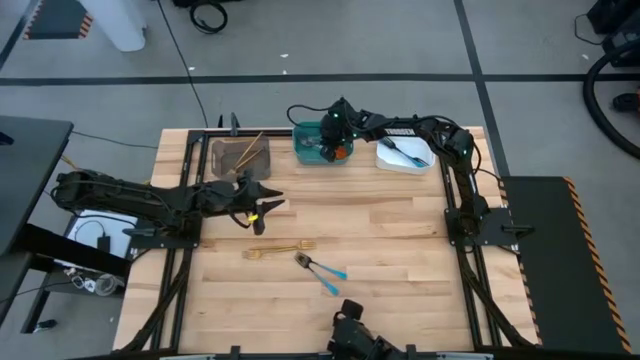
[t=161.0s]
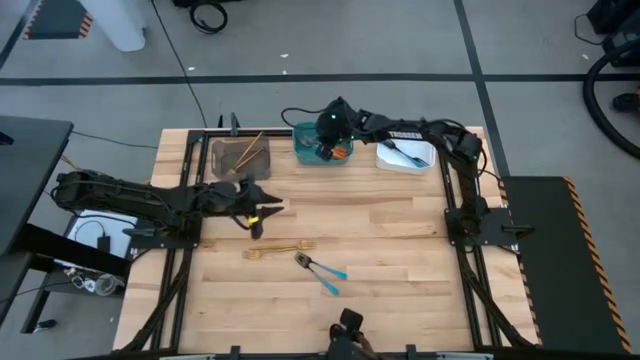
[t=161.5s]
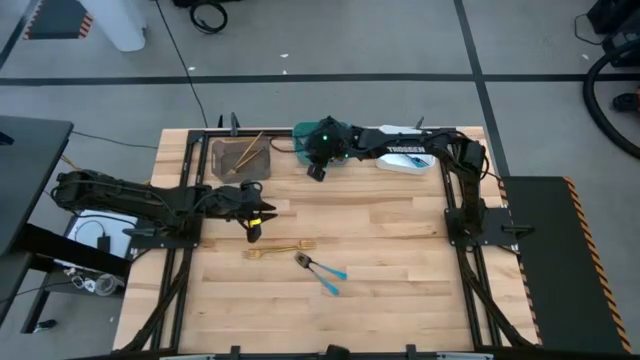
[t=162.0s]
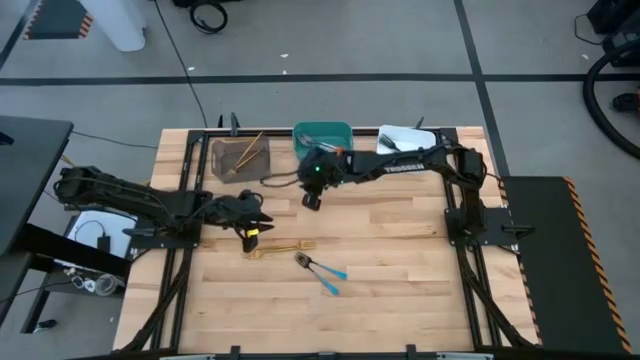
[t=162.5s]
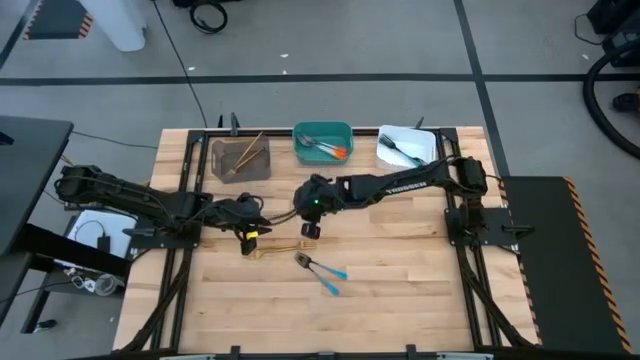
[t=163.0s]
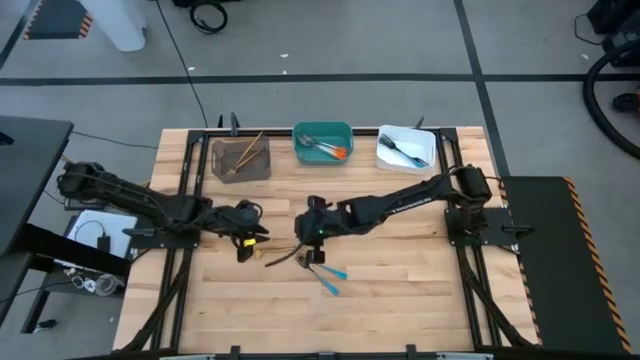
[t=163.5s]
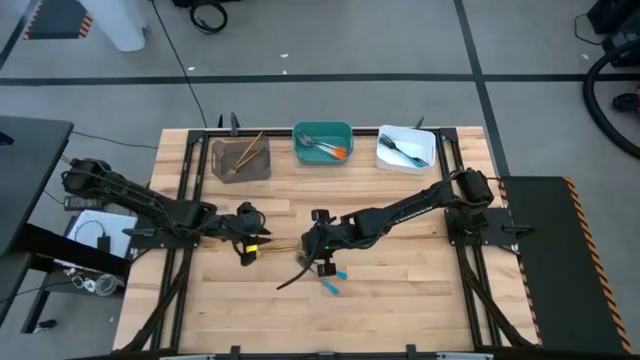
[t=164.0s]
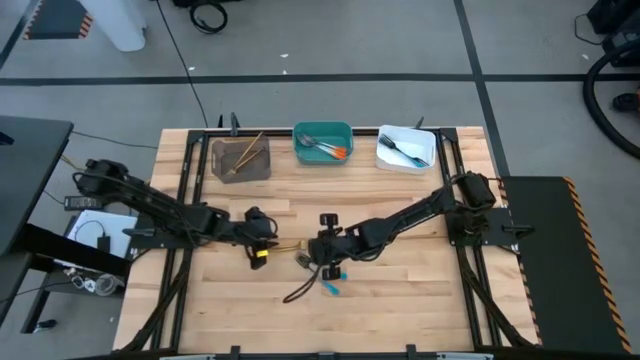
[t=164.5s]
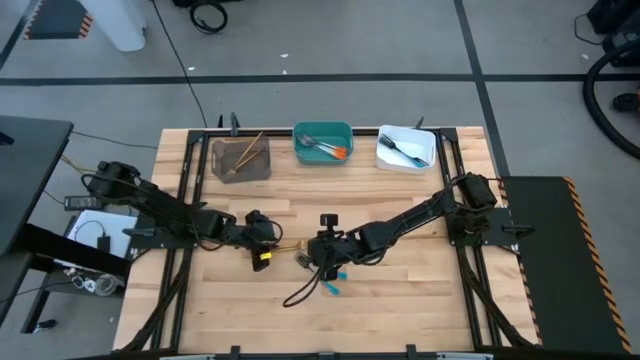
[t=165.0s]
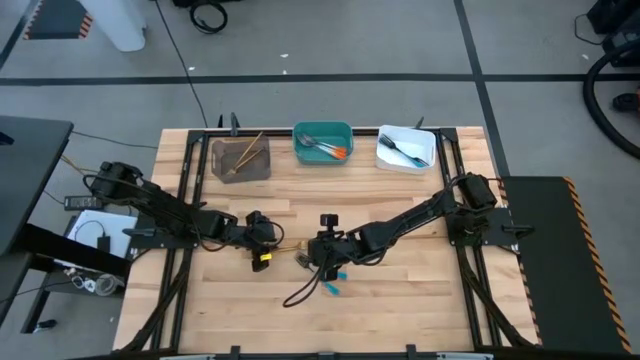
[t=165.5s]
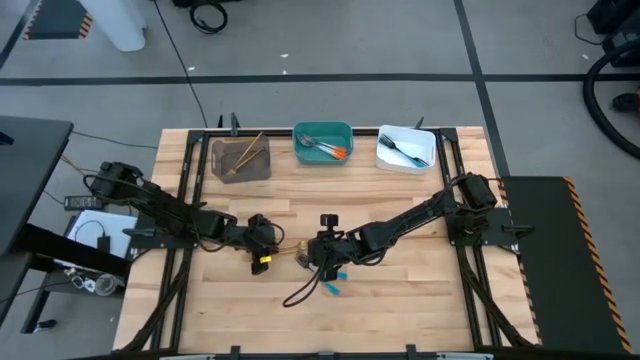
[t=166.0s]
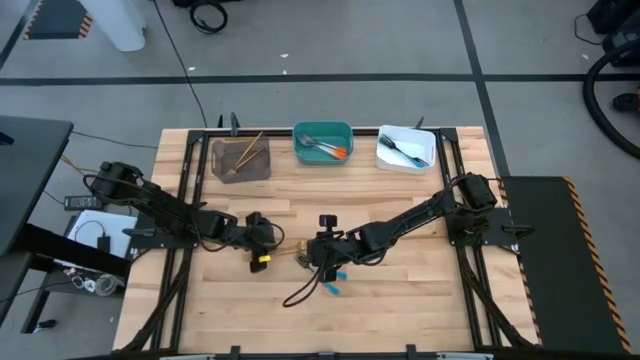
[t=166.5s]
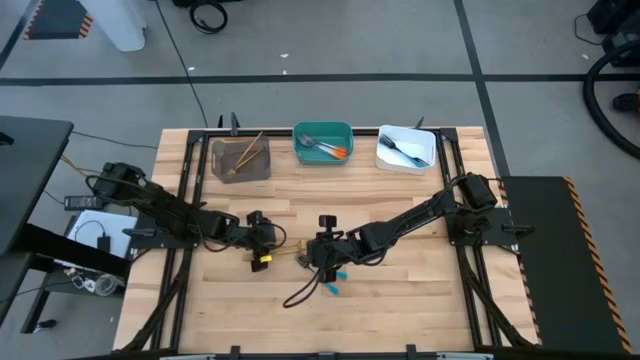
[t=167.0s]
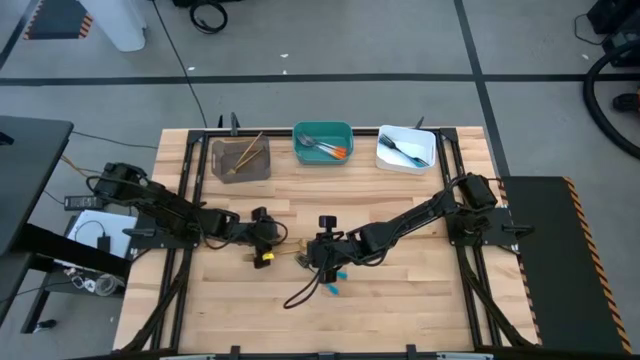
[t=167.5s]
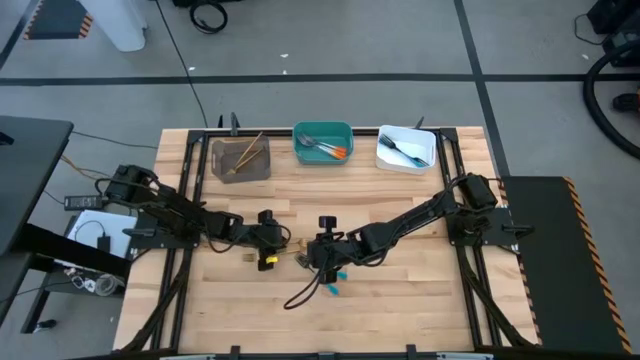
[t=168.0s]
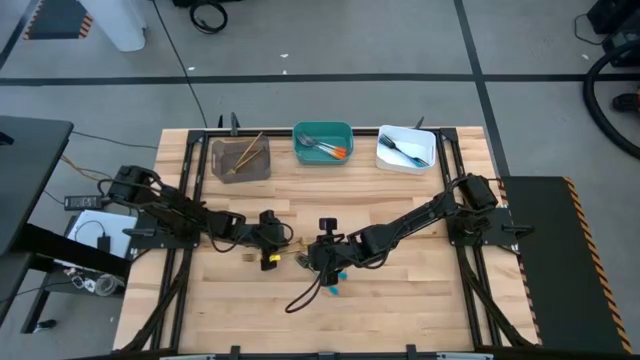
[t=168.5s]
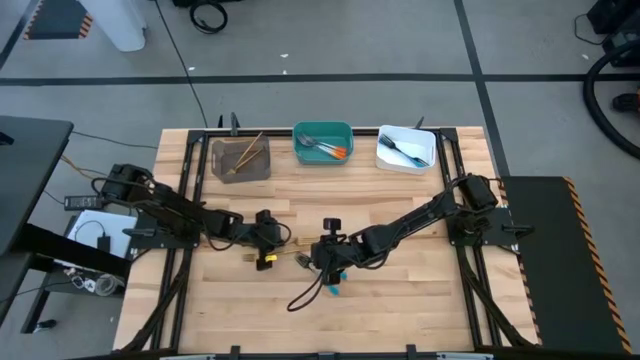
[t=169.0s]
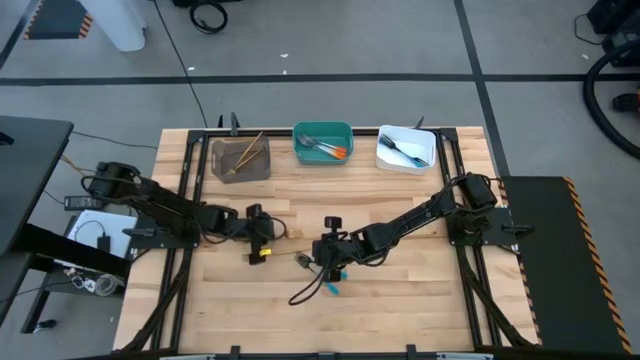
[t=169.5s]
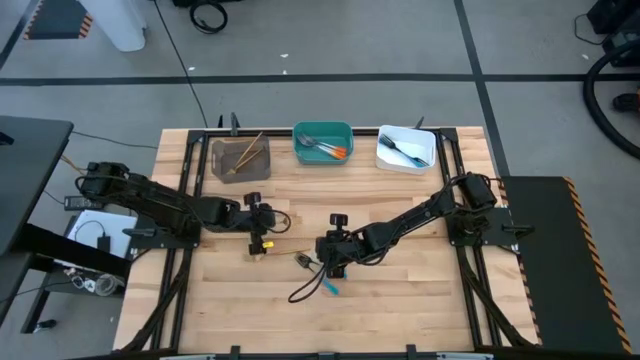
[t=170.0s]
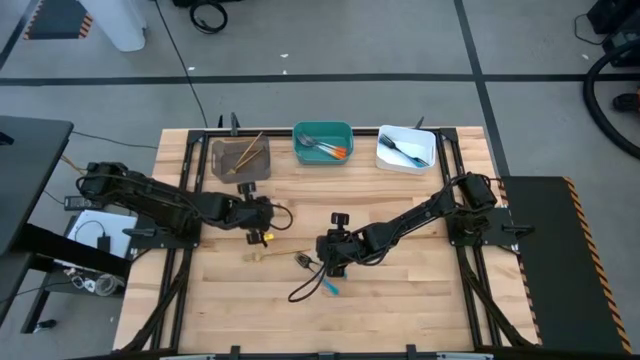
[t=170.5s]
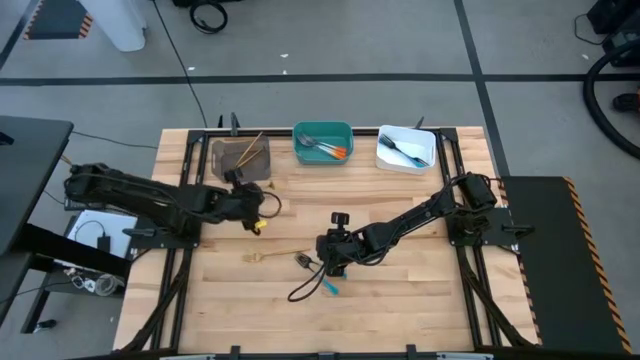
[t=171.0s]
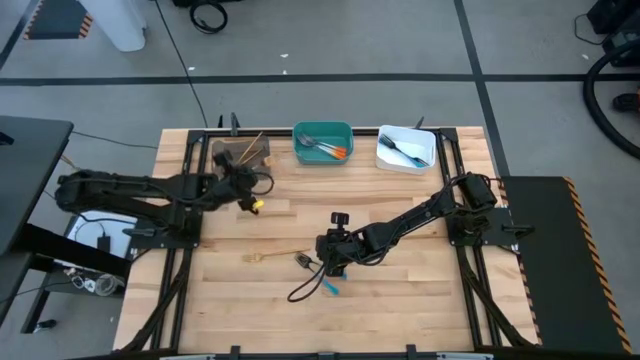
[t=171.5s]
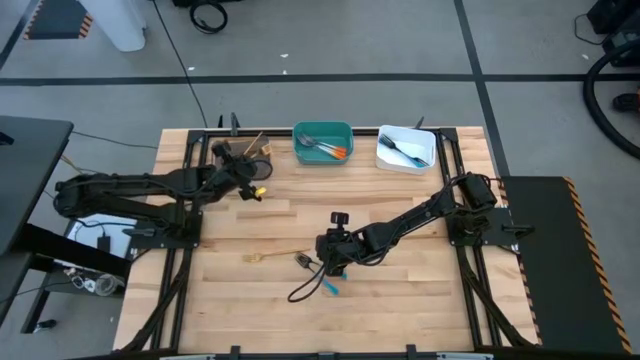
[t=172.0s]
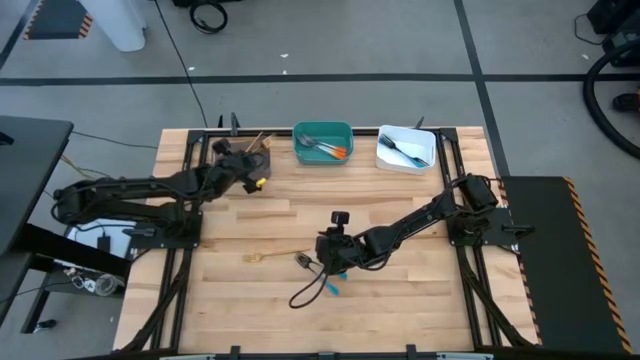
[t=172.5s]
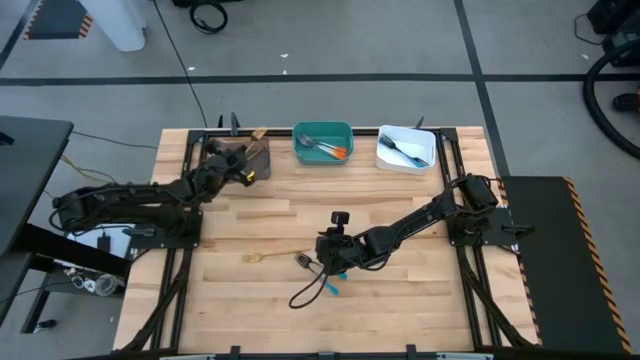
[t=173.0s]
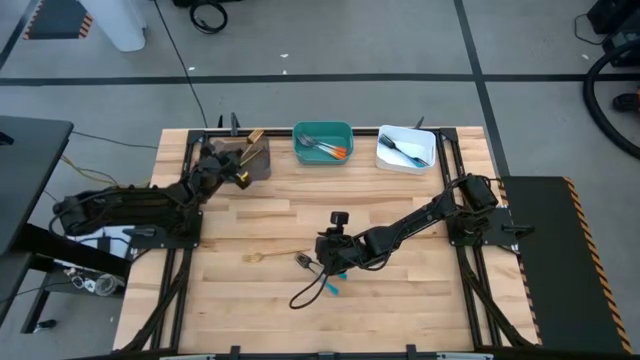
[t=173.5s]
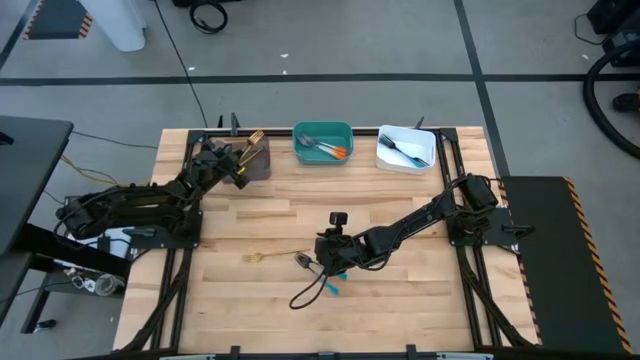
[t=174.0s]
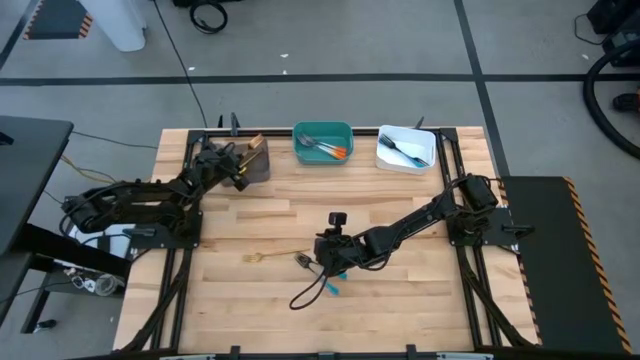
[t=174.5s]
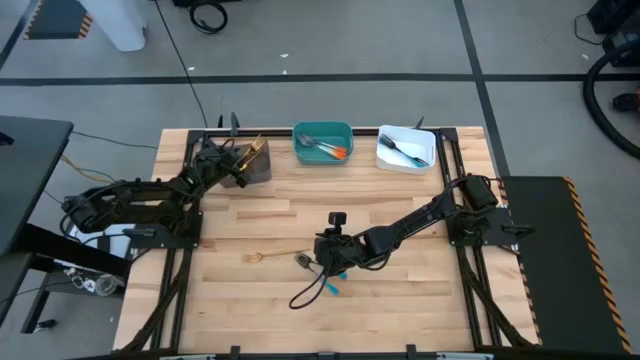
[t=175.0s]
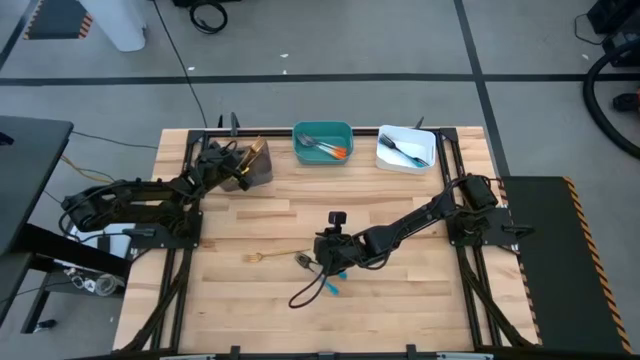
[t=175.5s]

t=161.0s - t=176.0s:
Task: Sort silverware by color (type)
Put the gold fork into the black bin

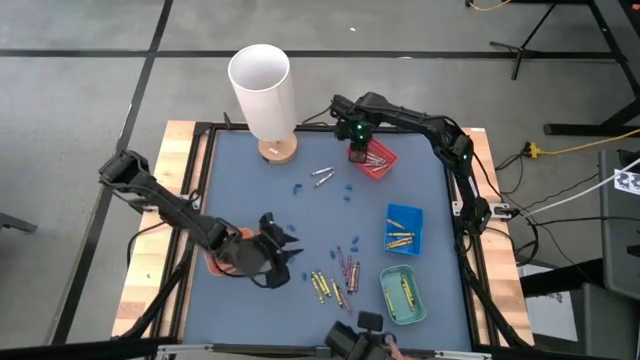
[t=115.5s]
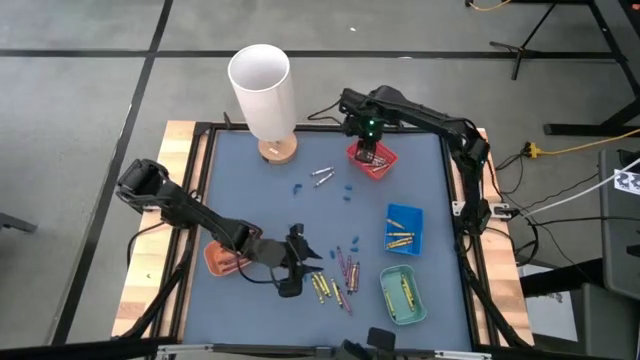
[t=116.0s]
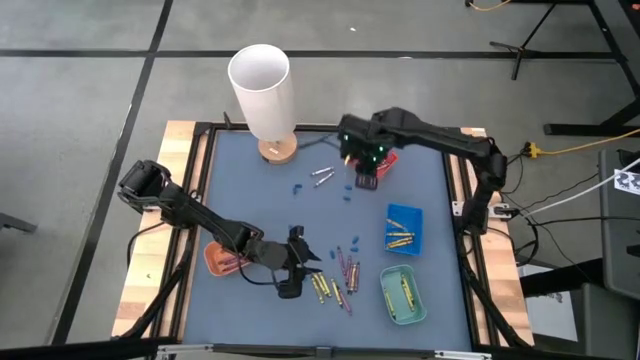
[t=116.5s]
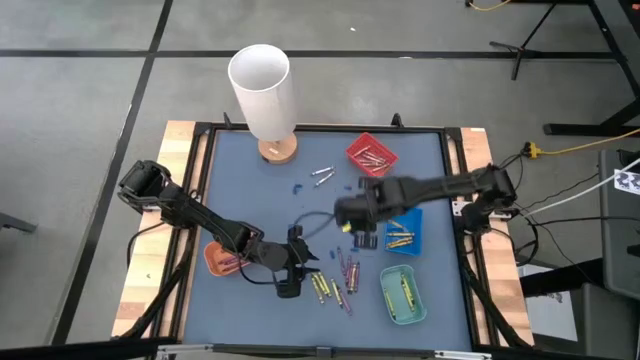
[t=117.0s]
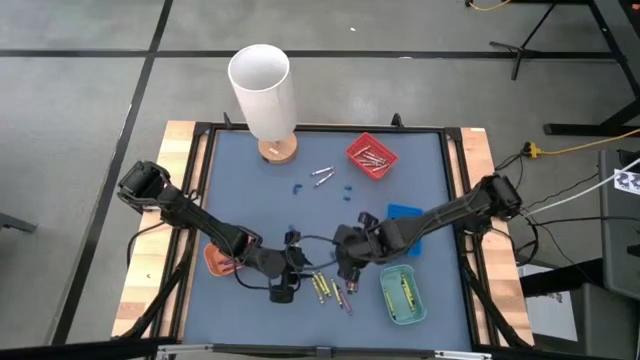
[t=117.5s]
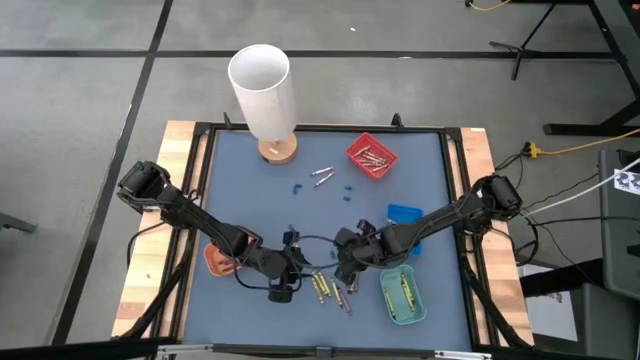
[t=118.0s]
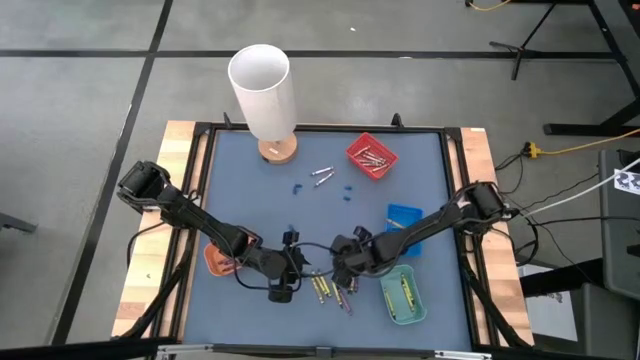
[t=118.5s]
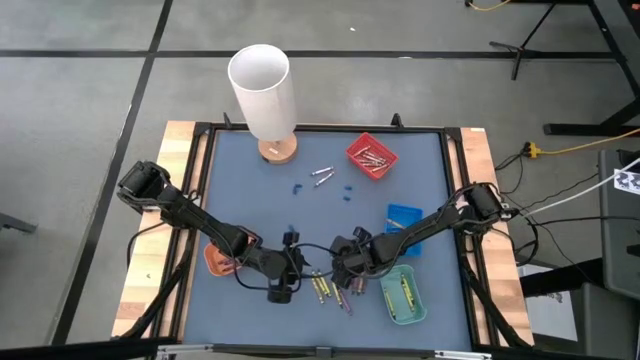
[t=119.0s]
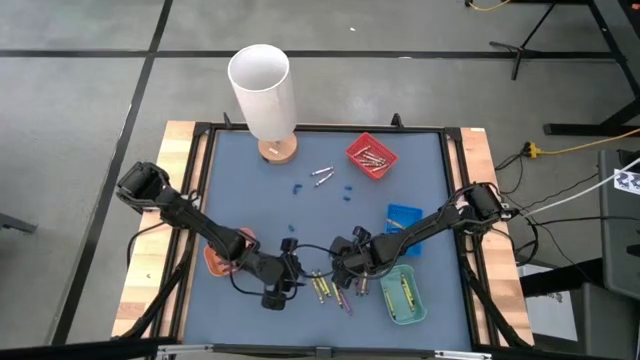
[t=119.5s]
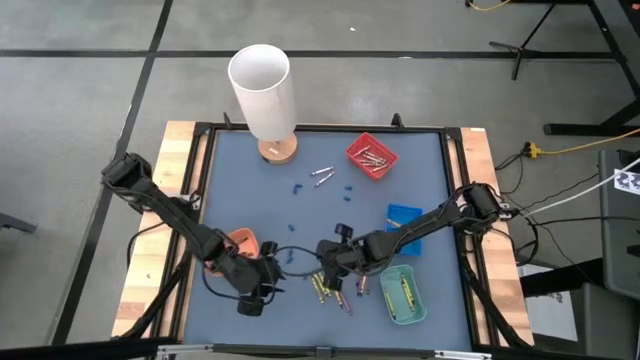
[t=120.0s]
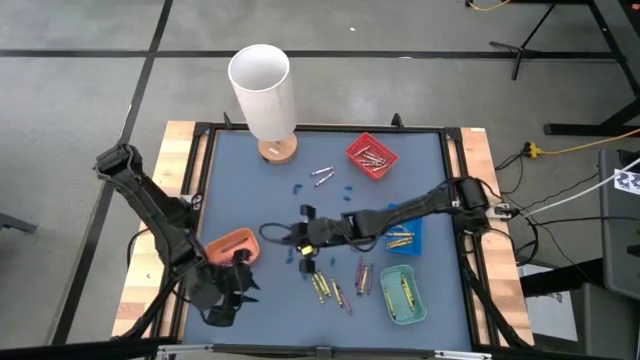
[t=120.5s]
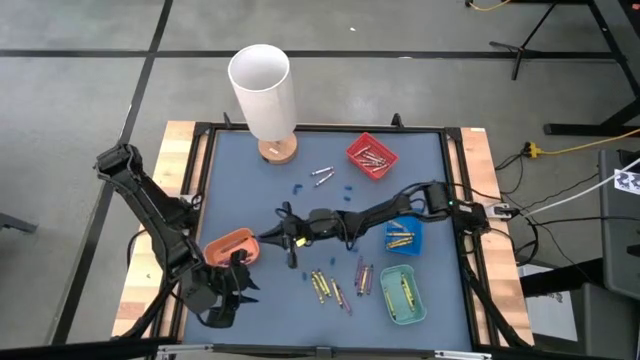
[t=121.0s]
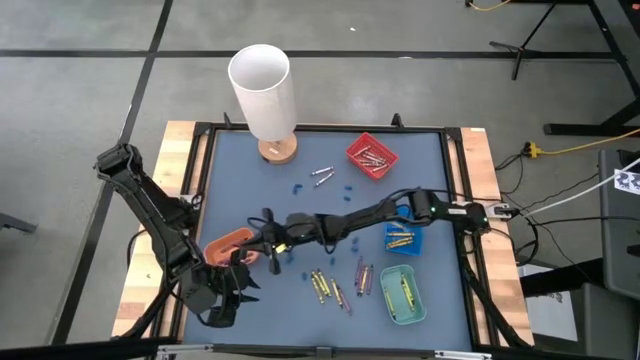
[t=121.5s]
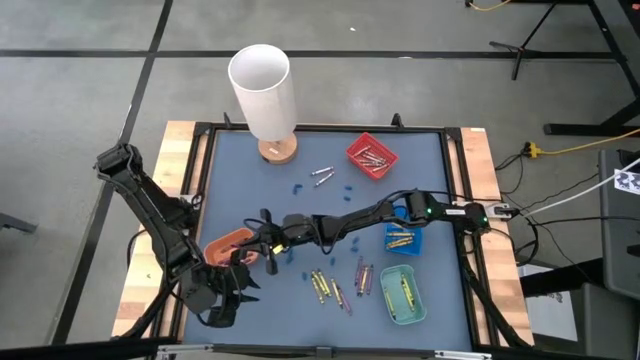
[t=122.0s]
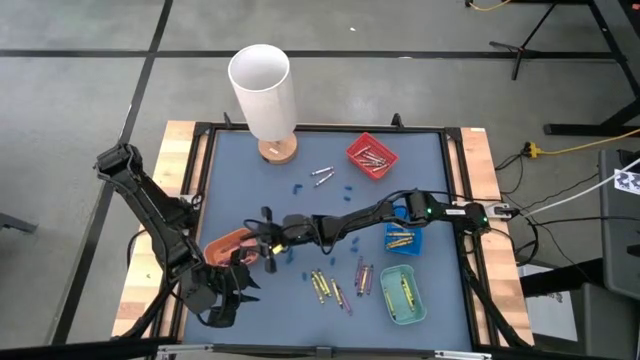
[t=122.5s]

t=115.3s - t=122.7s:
Task: Sort crayons
Put the violet crayon into the orange bin
